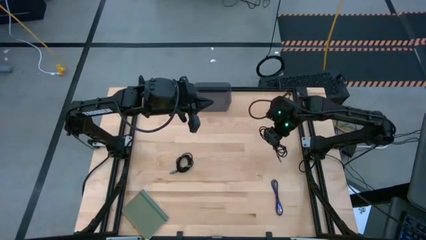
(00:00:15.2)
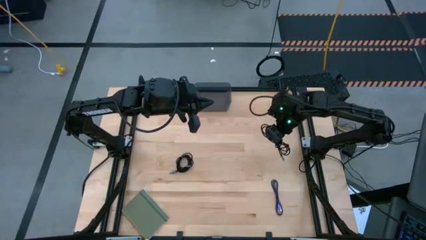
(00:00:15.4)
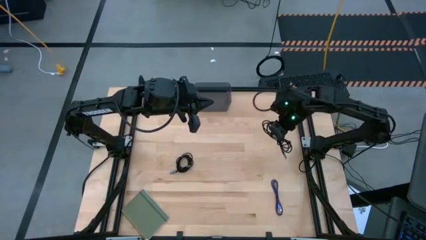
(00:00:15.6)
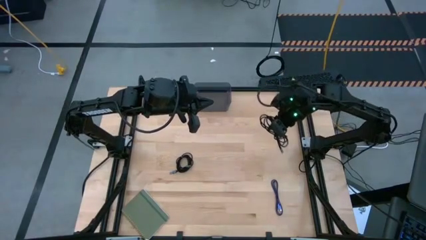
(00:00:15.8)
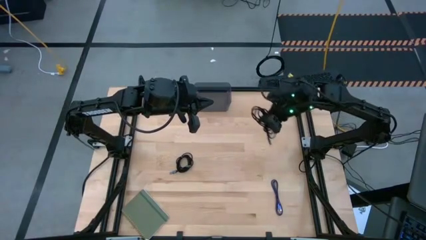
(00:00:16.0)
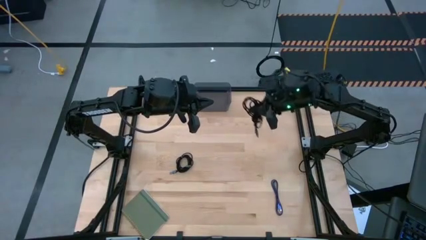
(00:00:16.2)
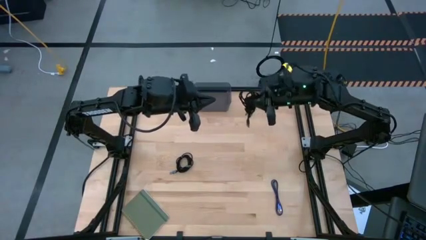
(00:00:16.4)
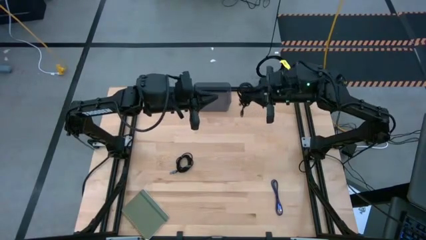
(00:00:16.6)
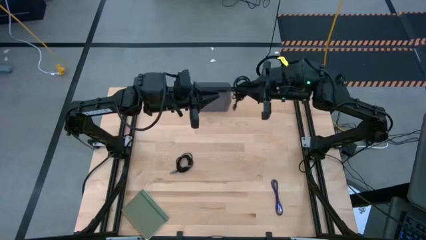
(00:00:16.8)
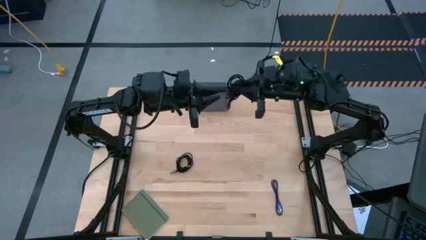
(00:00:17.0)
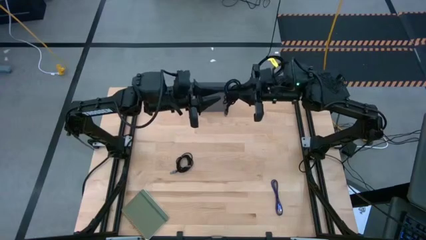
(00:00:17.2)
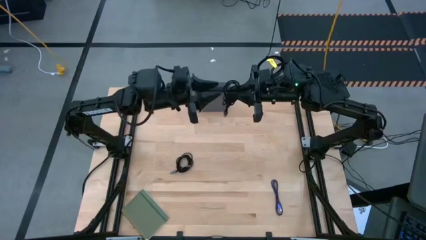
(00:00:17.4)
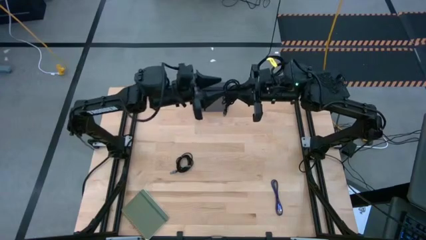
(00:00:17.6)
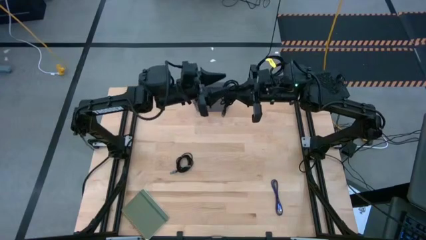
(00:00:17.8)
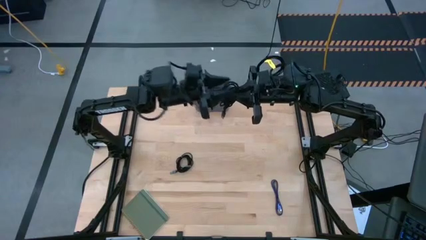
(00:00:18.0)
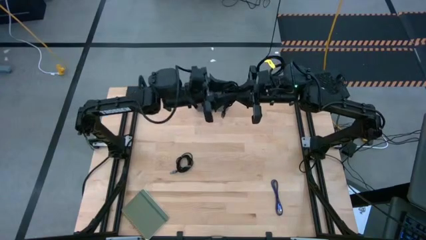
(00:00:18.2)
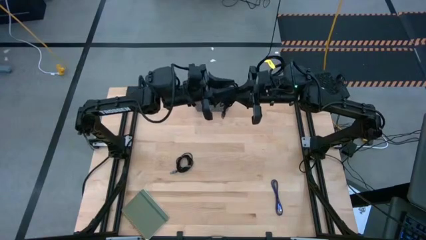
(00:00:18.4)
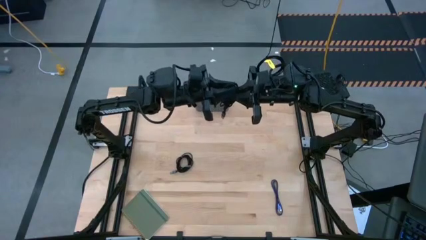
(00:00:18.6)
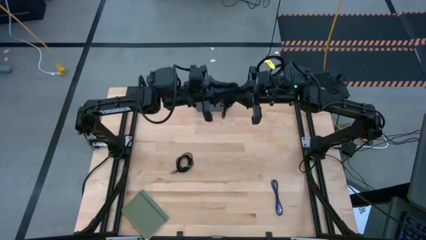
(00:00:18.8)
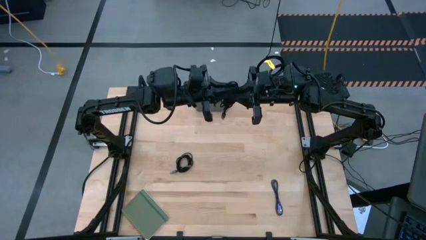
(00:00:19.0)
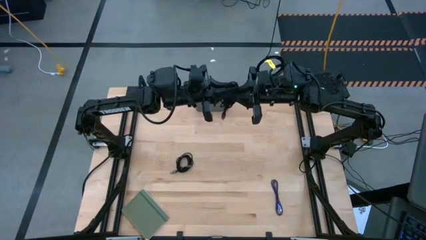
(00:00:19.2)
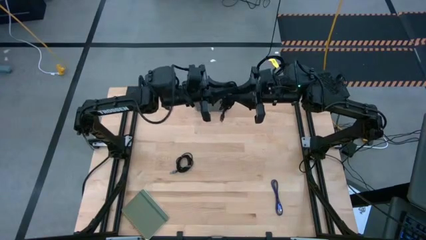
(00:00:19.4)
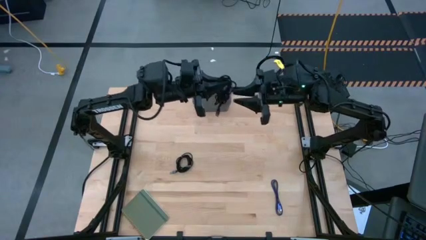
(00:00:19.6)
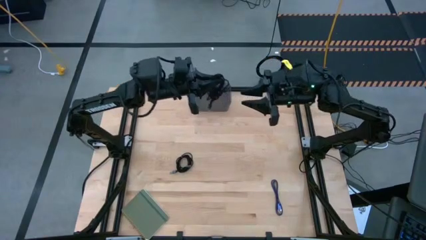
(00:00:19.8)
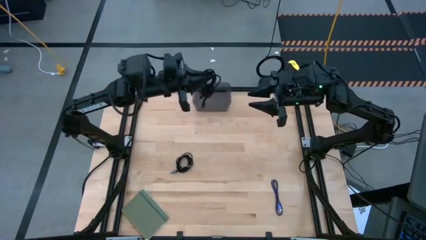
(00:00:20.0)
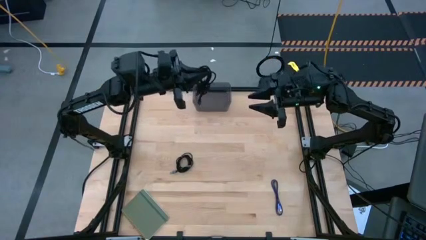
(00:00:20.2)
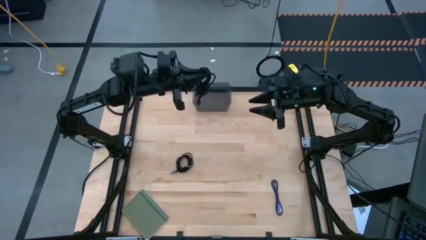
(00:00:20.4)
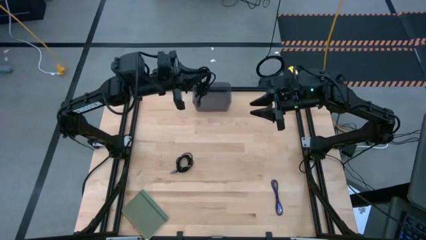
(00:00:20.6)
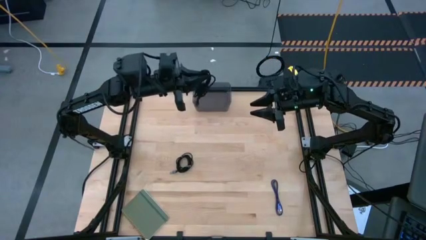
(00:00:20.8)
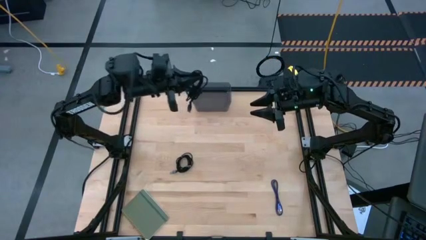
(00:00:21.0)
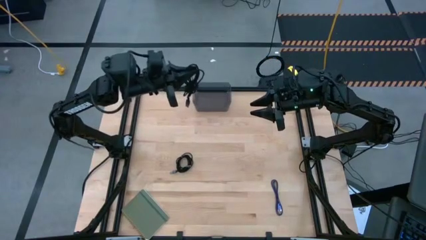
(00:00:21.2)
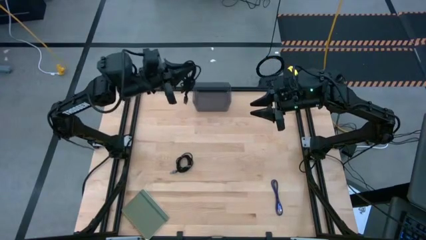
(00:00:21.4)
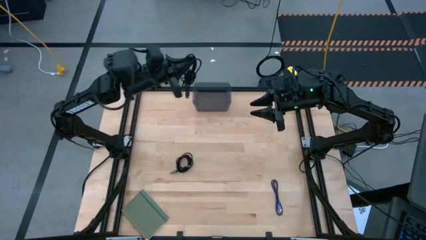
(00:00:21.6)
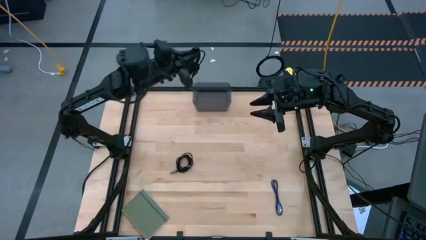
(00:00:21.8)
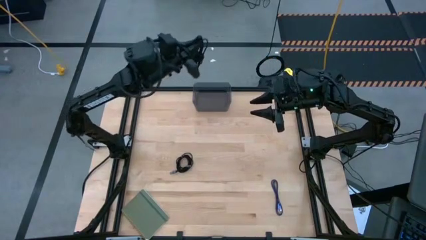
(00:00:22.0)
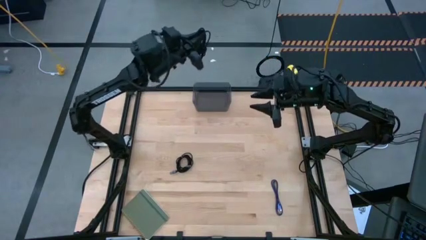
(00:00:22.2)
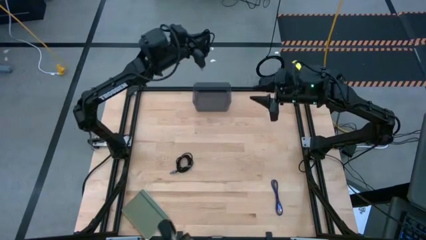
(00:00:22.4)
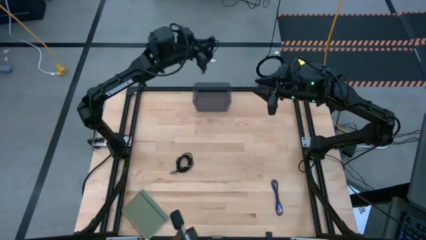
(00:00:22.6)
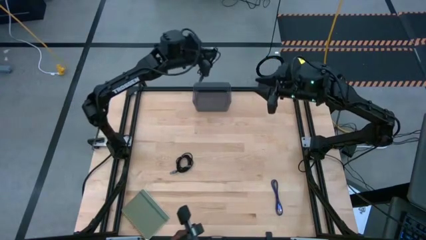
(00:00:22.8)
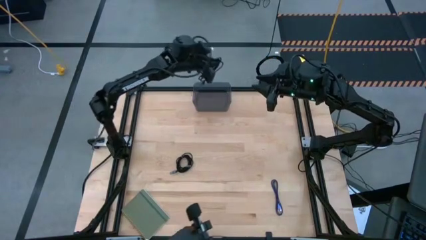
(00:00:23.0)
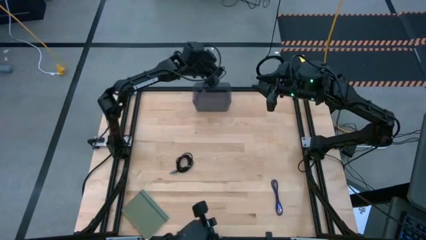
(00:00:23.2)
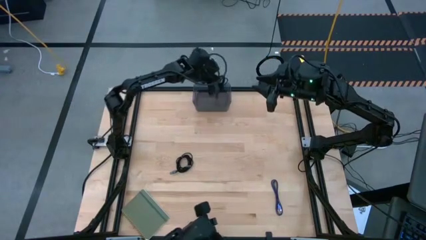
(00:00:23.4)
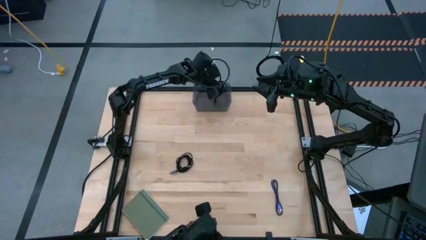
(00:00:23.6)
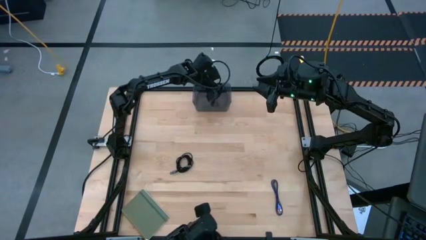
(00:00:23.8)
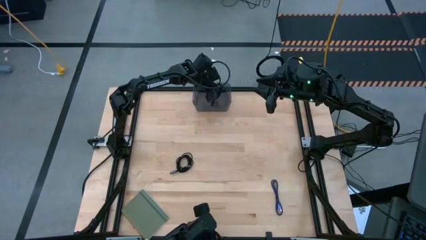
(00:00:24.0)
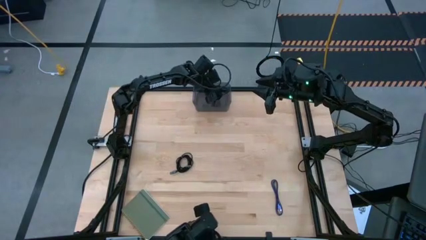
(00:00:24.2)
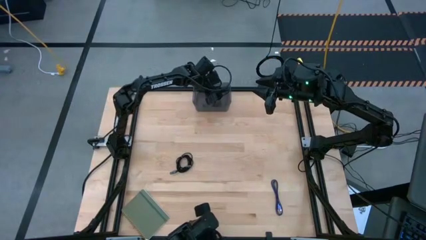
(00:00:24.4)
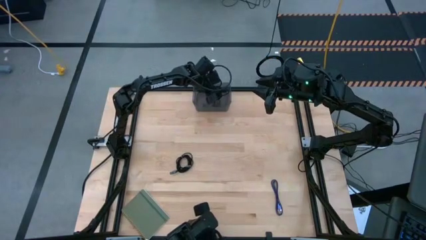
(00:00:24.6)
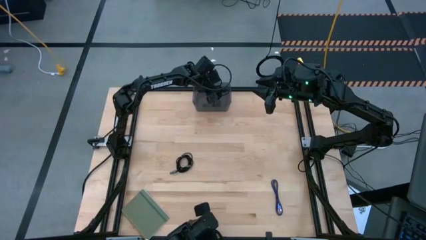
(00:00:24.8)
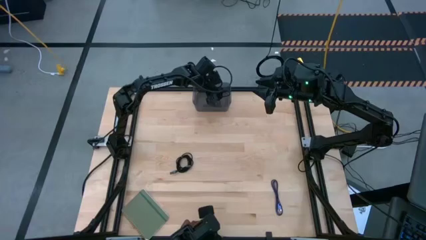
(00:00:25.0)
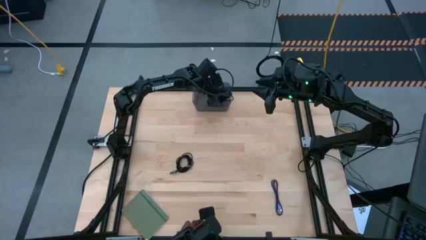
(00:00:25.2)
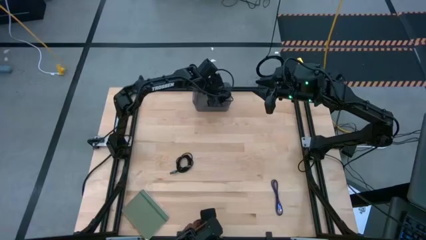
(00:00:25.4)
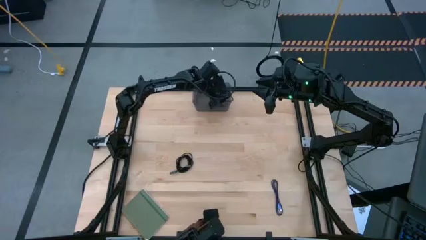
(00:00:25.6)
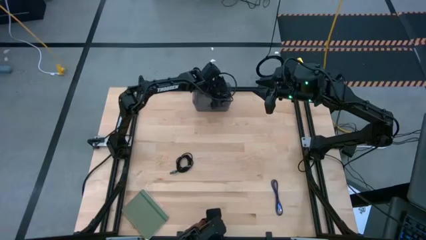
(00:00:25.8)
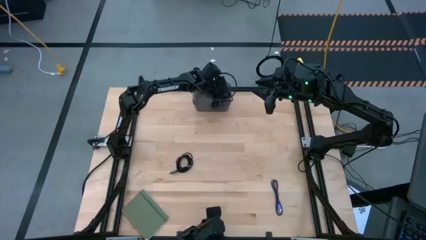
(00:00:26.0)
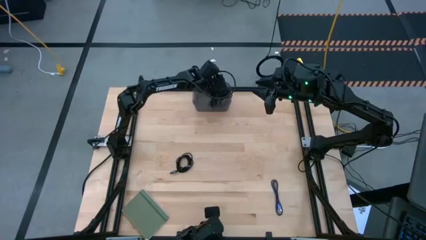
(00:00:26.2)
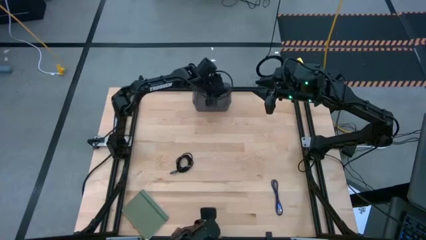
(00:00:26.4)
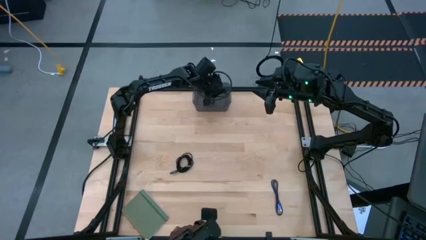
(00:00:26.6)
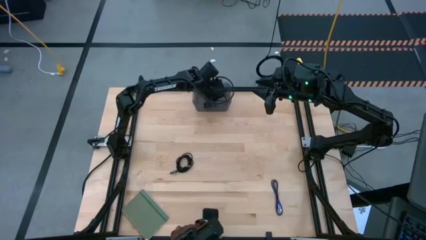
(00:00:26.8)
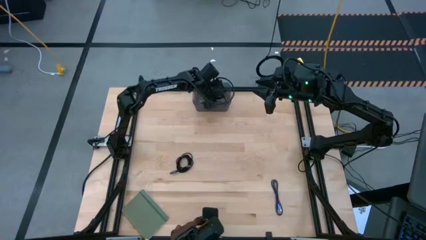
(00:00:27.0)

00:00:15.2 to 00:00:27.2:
Task: Pick and place USB-C Cables
Put the right black USB cable into the black bin

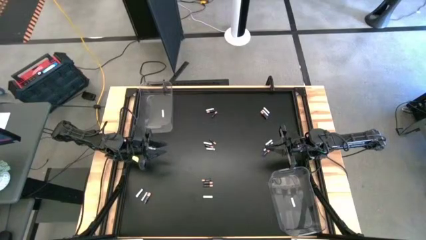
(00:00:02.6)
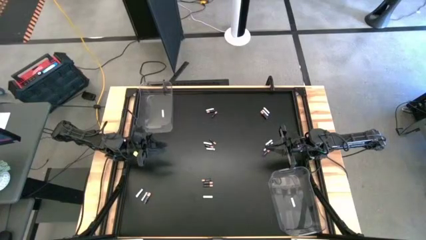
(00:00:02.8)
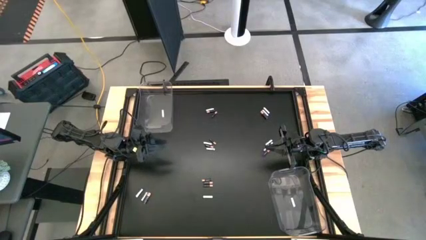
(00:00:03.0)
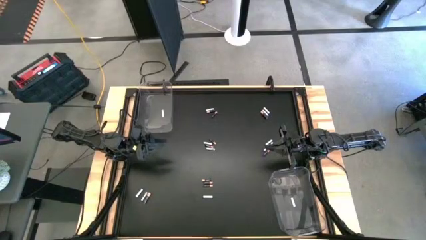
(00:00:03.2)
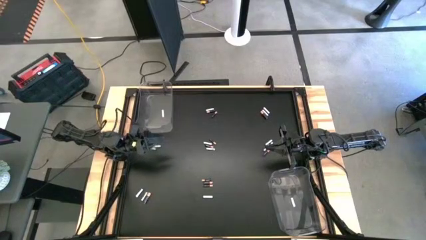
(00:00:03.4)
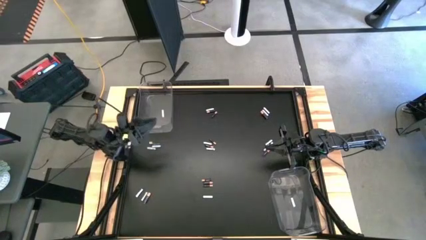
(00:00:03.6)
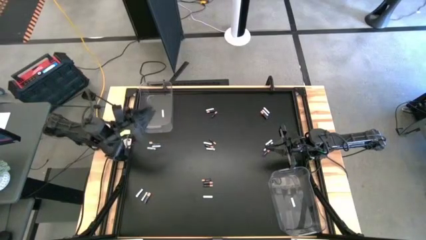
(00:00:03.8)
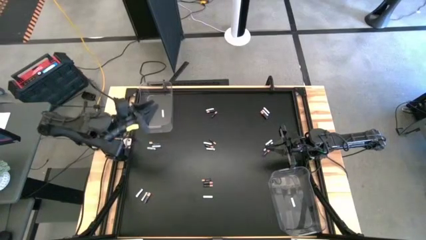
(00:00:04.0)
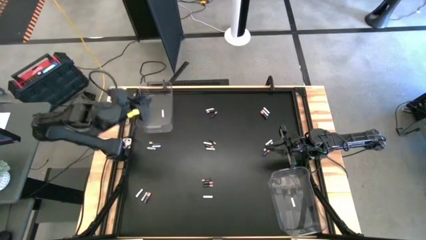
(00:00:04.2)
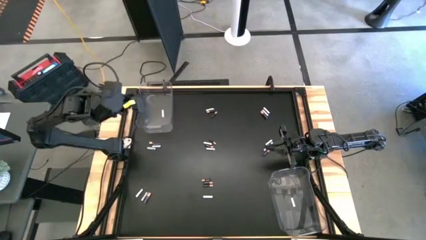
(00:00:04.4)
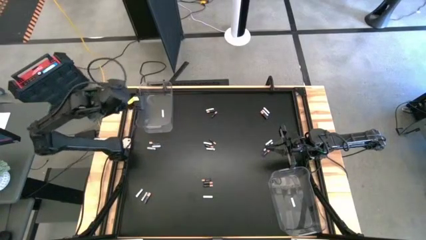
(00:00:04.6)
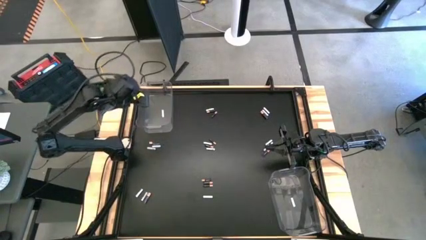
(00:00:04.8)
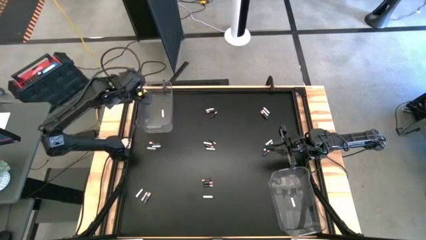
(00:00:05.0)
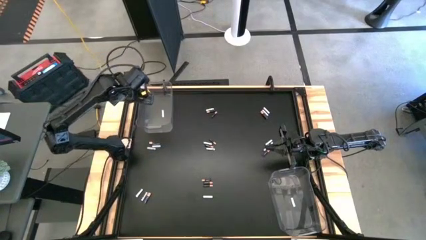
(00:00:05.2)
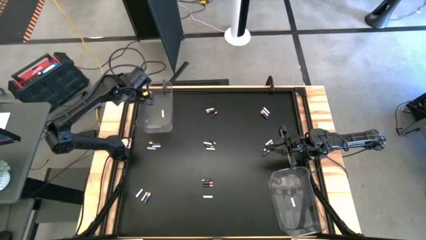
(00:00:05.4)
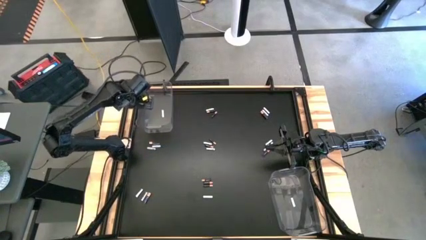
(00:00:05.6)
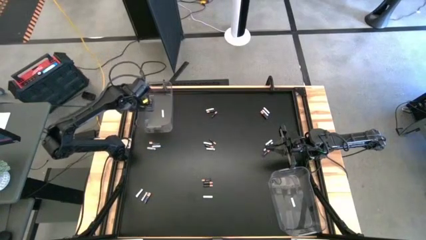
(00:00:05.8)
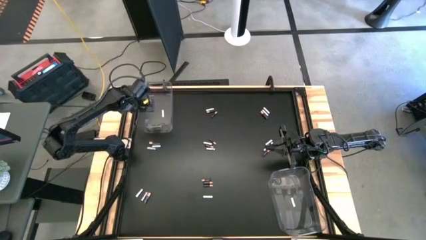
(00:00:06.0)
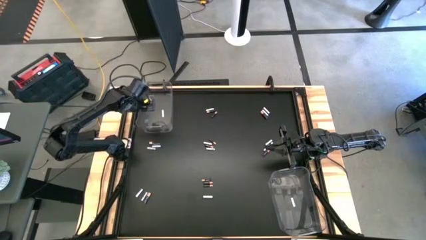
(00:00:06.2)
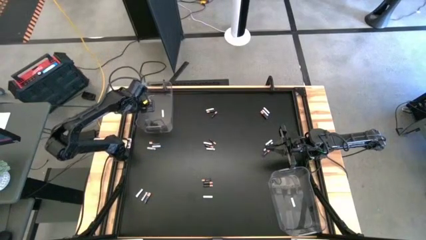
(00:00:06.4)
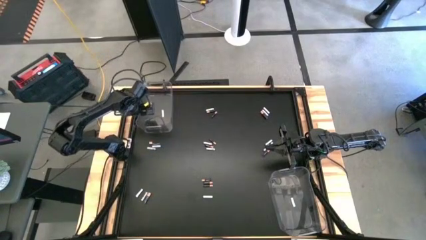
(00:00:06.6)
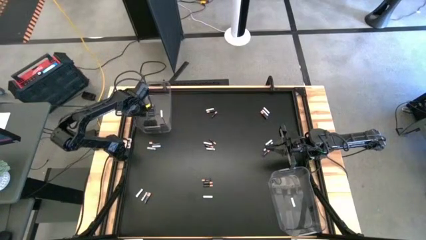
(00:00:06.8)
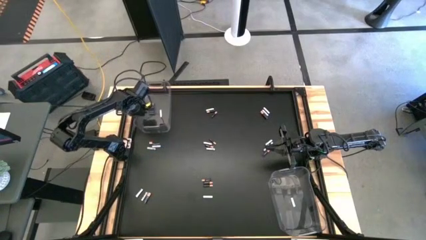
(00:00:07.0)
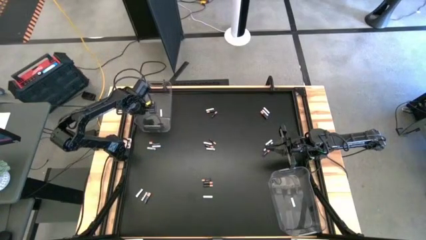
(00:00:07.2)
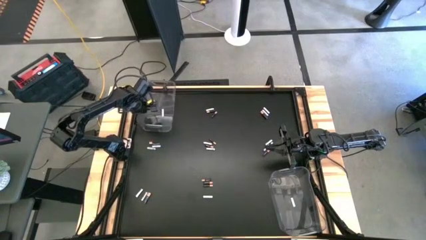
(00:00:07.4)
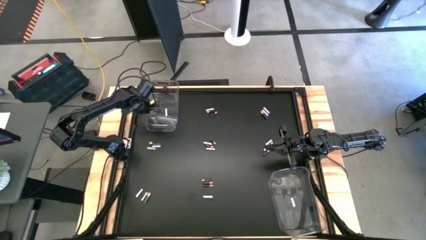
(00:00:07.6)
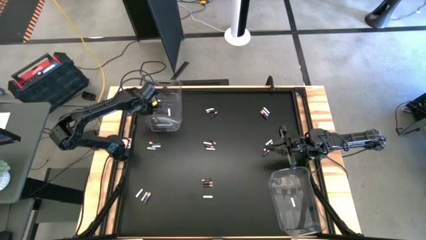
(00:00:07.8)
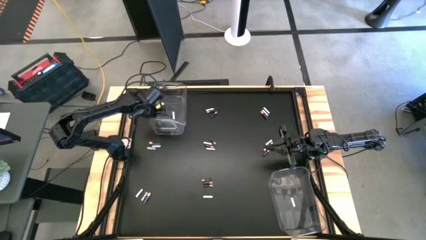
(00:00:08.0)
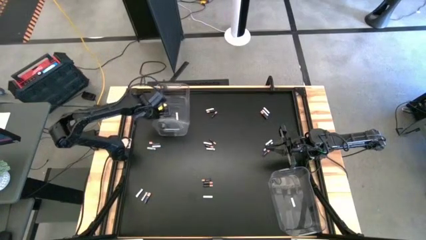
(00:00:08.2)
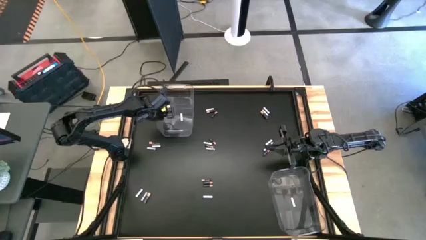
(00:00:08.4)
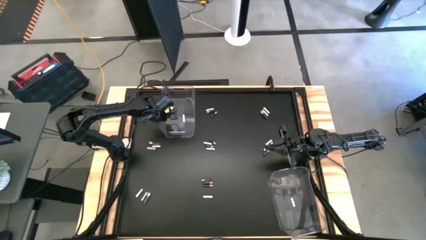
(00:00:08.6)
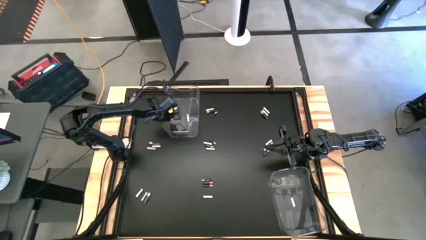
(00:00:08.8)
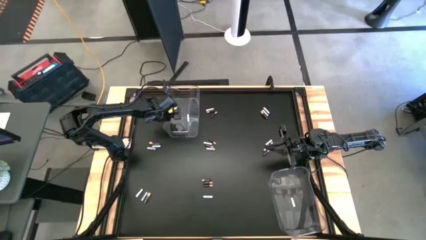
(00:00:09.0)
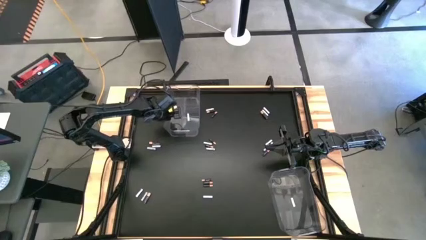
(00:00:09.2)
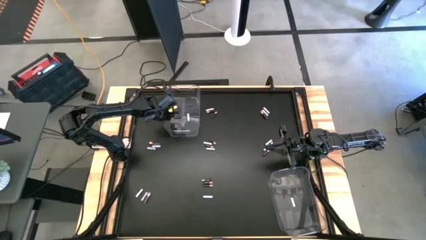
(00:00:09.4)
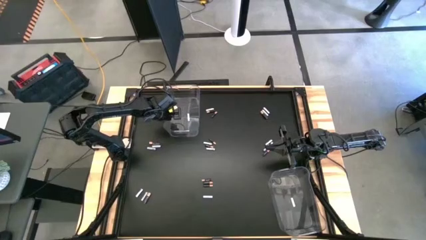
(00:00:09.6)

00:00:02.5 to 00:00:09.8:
Task: Sort batteries
Adjust the top transparent bin
